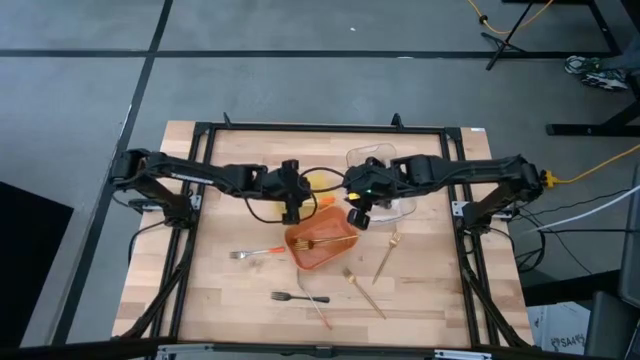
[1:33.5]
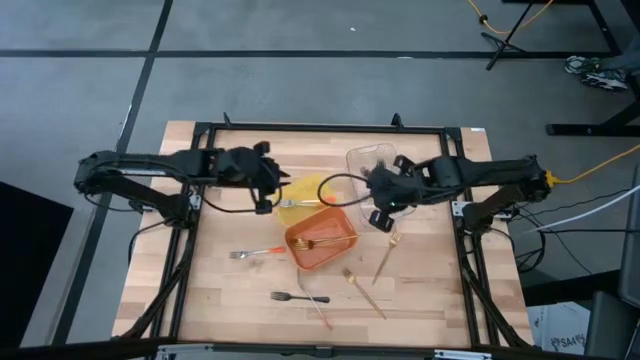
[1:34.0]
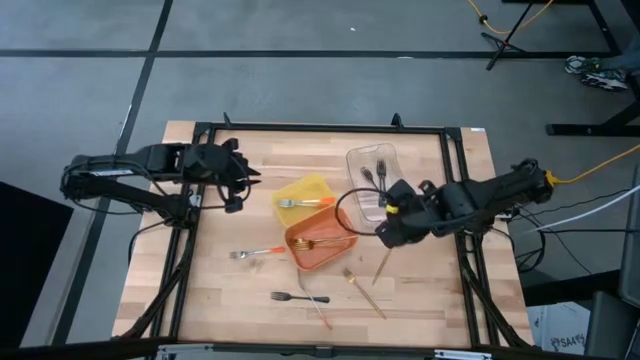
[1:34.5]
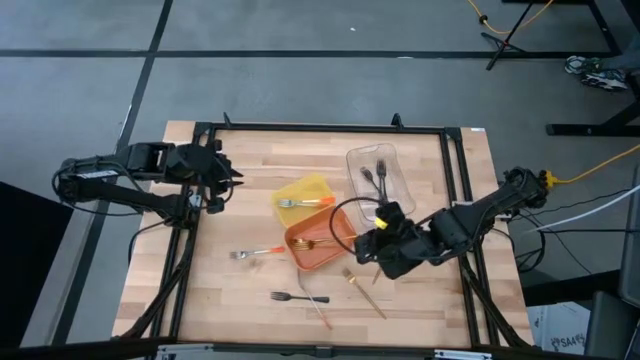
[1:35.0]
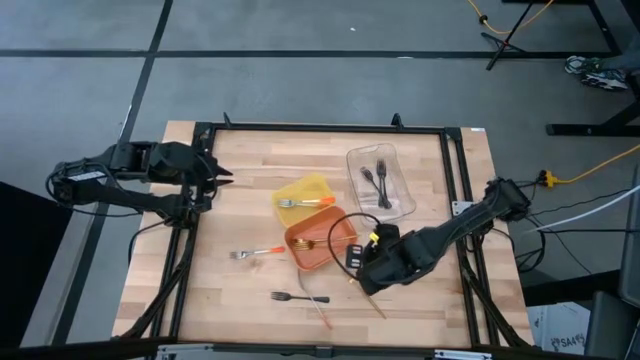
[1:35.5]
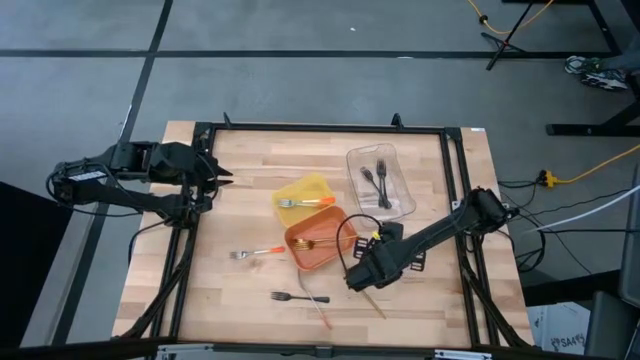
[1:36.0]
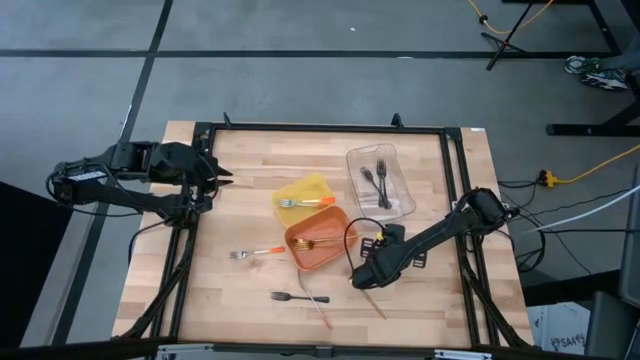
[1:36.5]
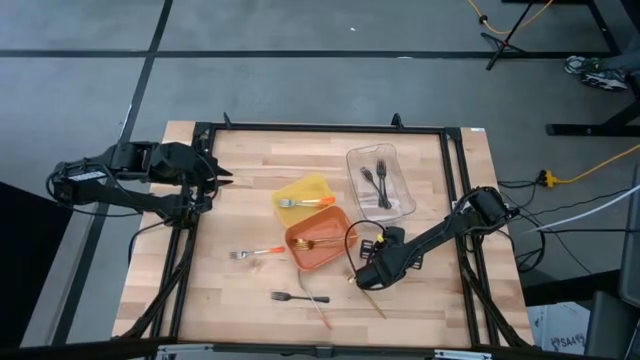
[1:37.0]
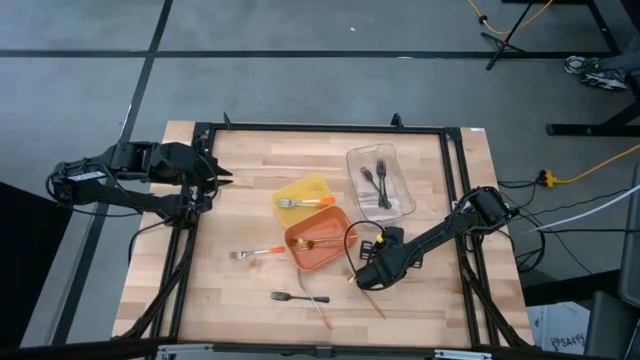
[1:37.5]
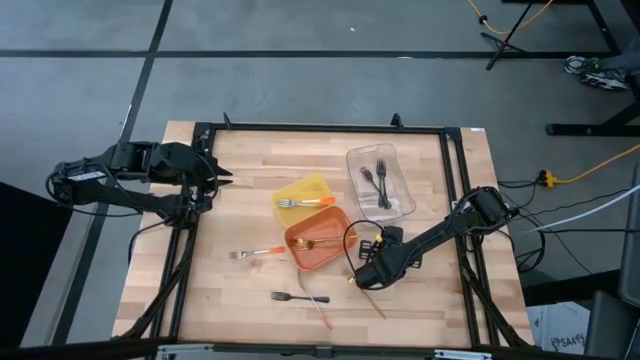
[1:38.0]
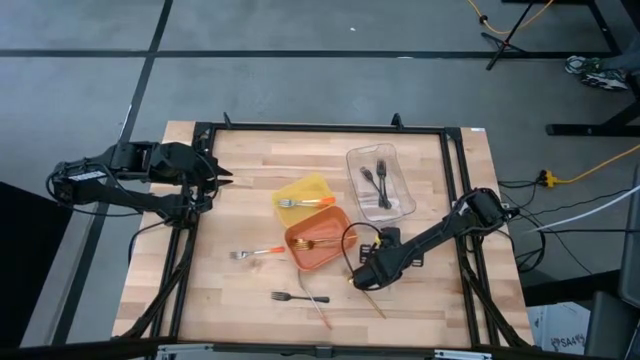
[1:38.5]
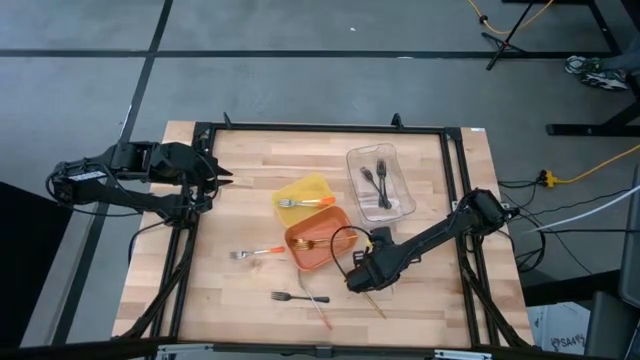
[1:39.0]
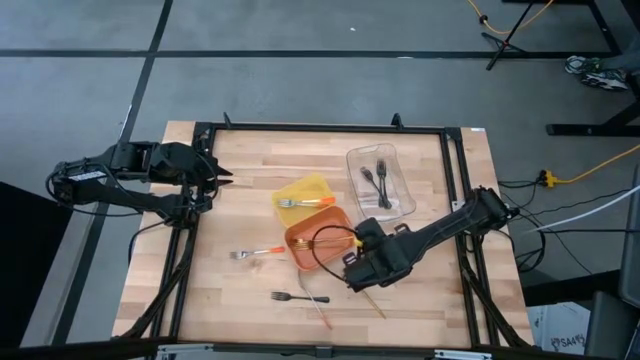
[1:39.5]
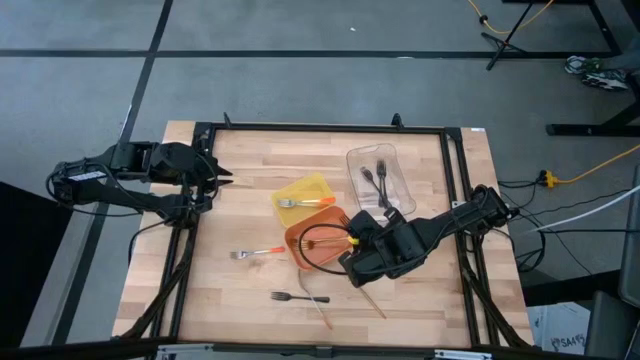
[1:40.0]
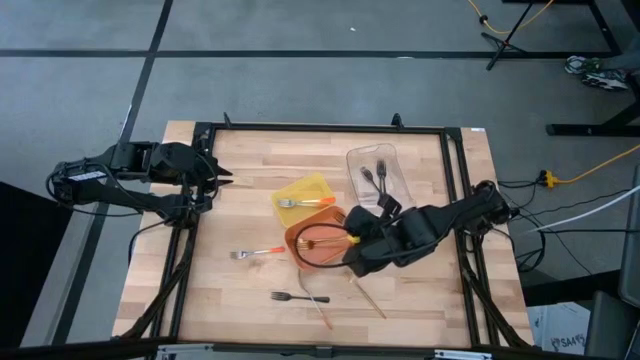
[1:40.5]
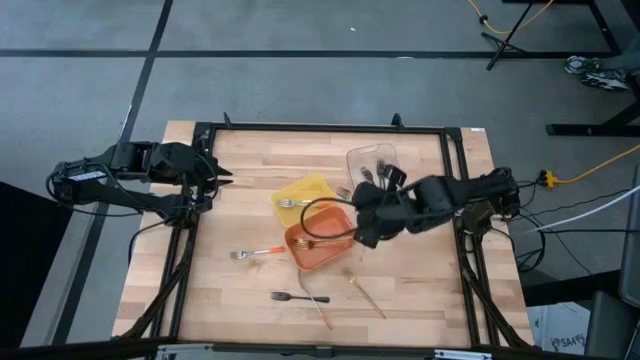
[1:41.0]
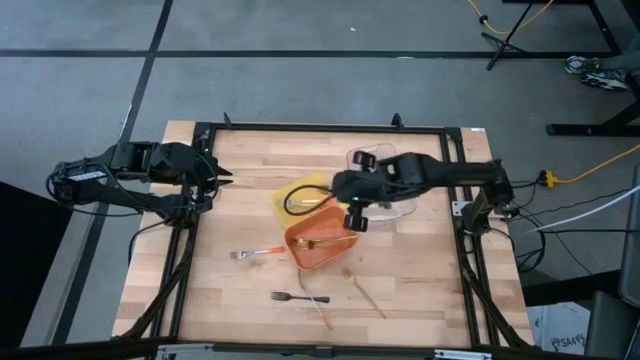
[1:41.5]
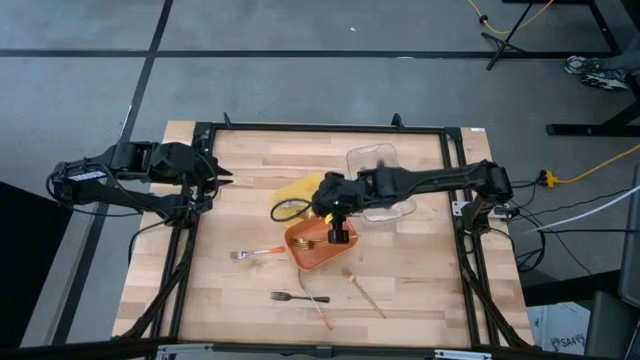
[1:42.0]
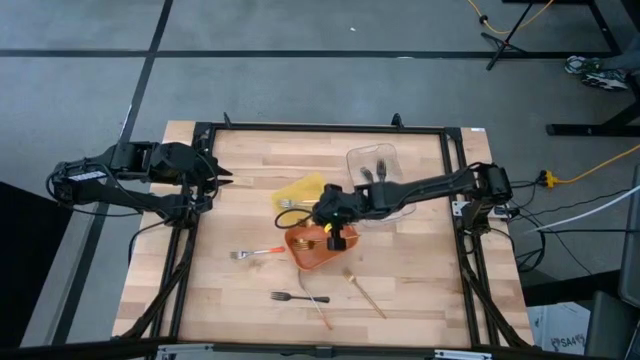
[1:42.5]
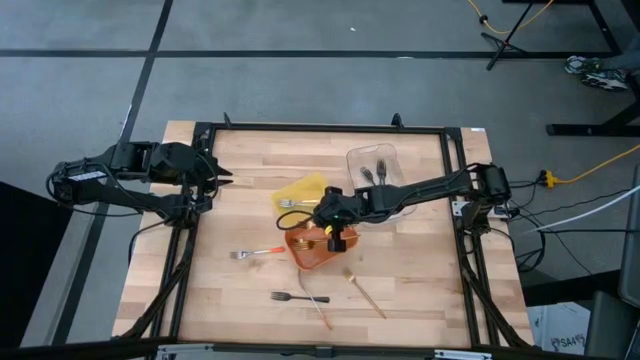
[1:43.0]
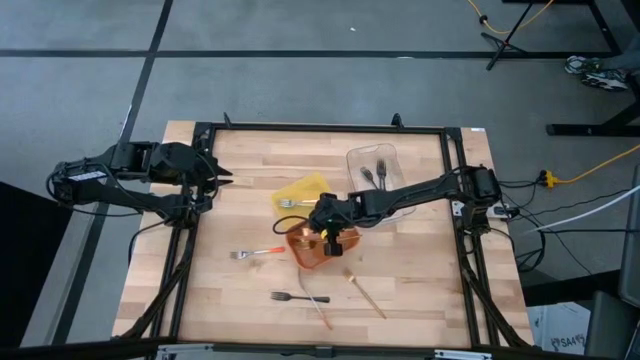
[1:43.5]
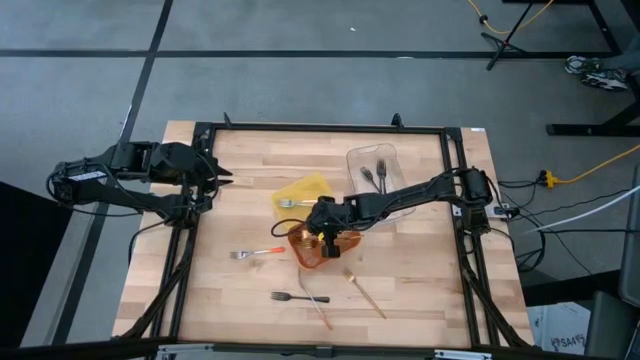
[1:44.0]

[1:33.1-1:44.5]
Task: Sort silverware by color (type)
Put the gold fork into the orange bin

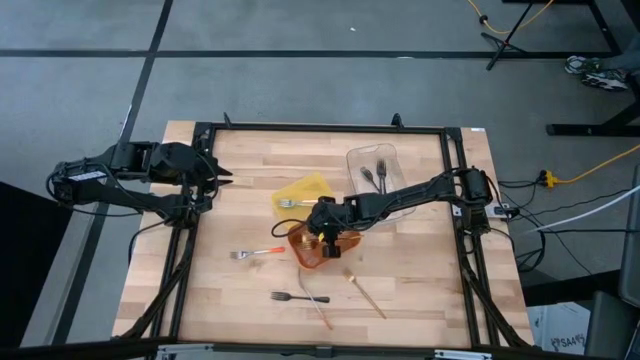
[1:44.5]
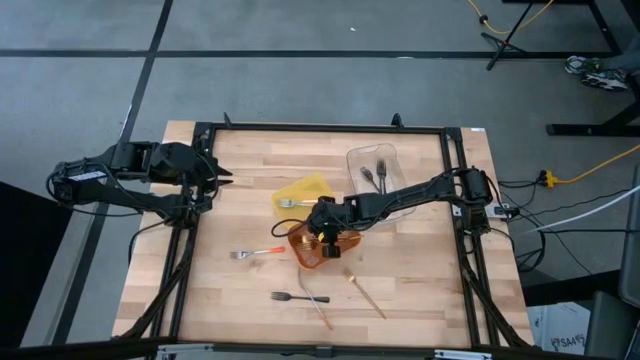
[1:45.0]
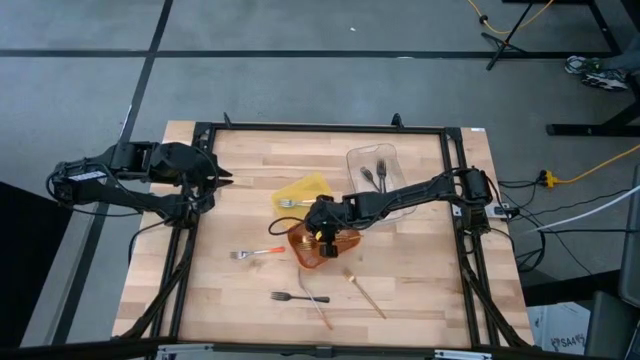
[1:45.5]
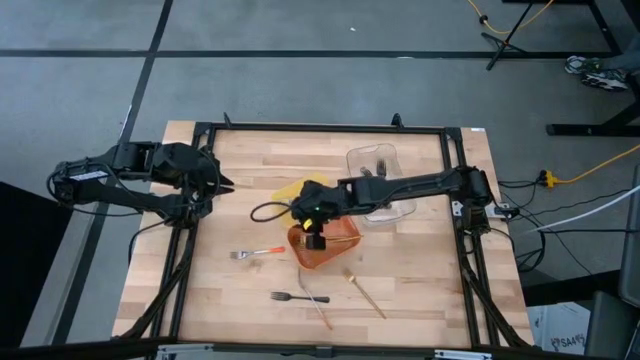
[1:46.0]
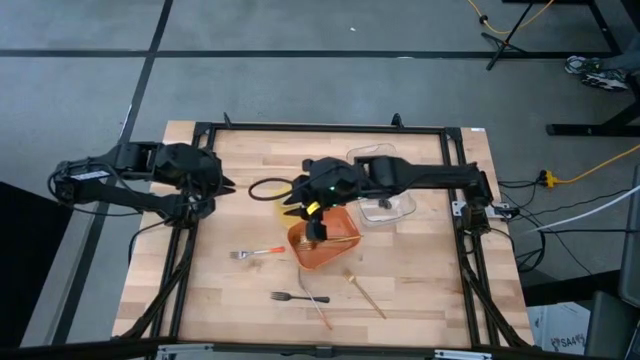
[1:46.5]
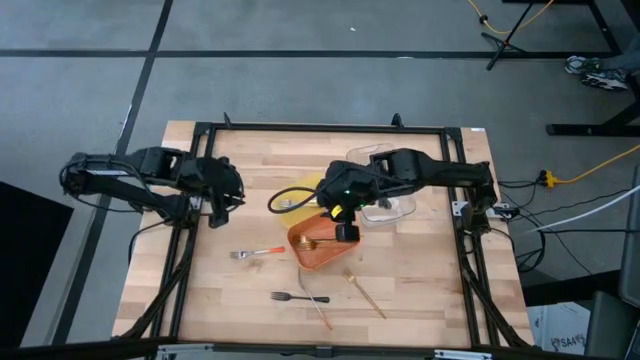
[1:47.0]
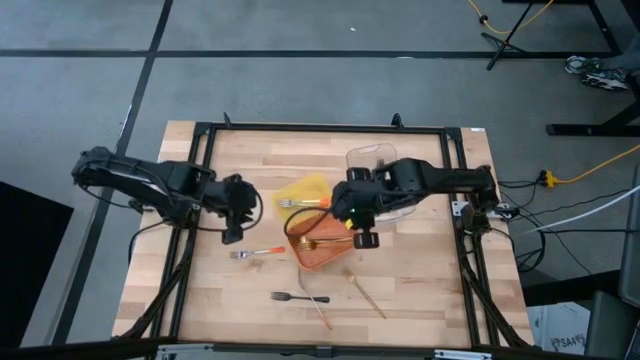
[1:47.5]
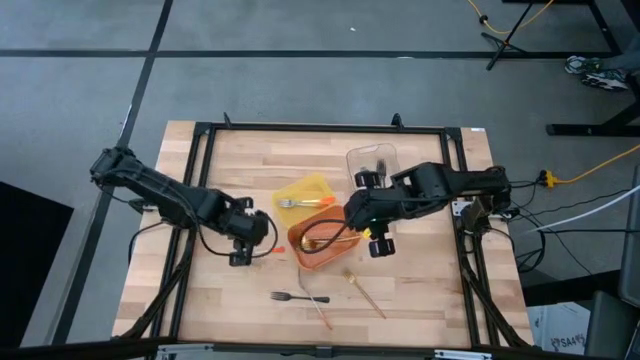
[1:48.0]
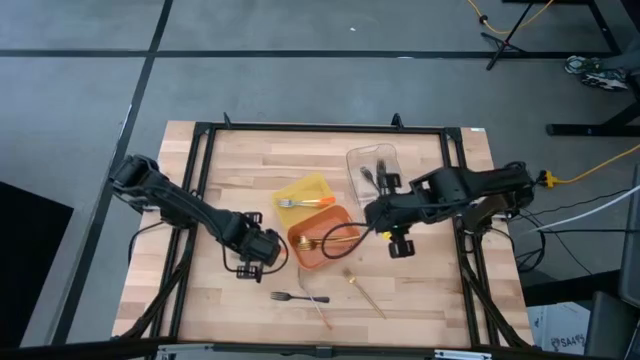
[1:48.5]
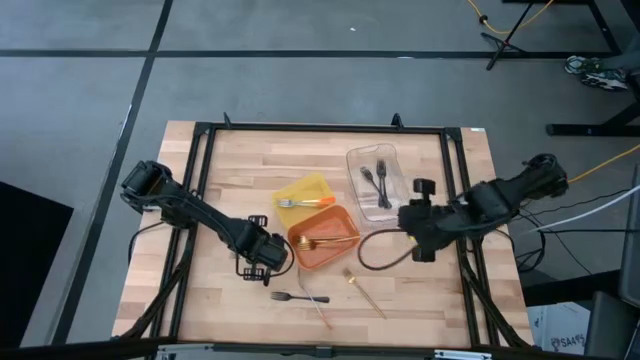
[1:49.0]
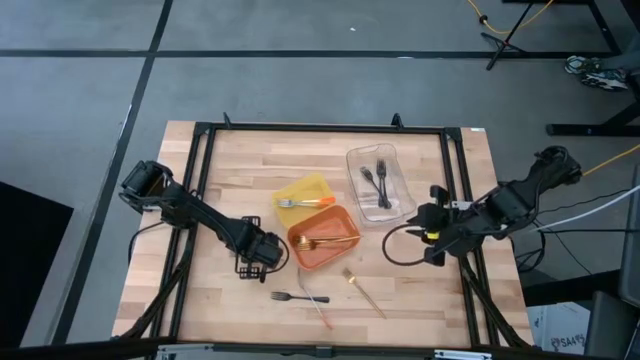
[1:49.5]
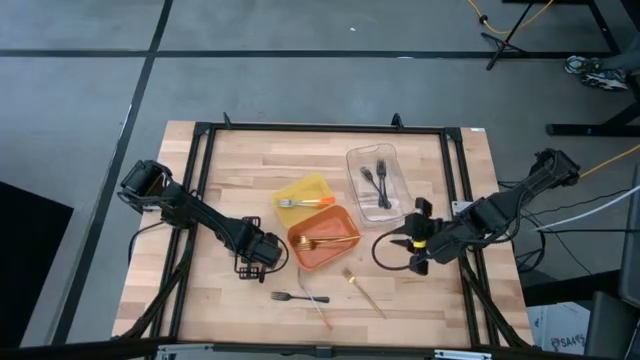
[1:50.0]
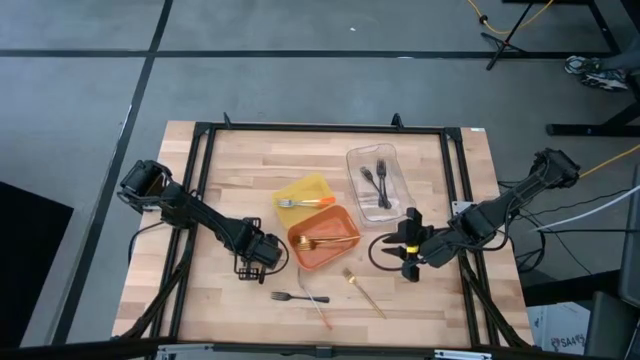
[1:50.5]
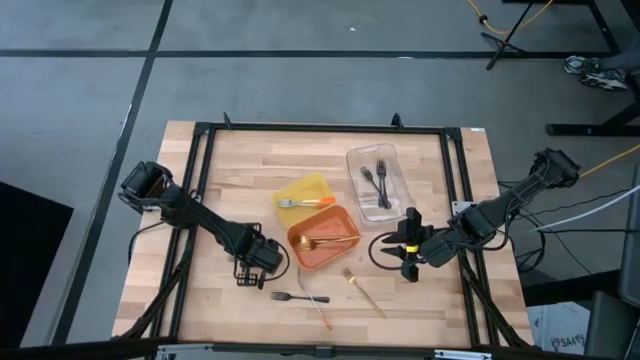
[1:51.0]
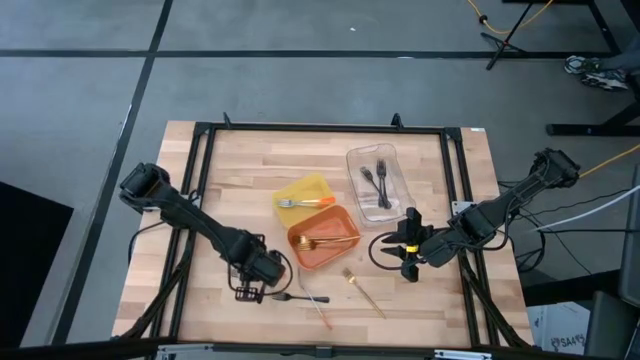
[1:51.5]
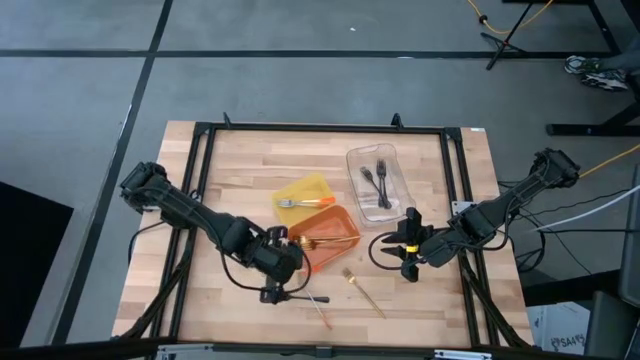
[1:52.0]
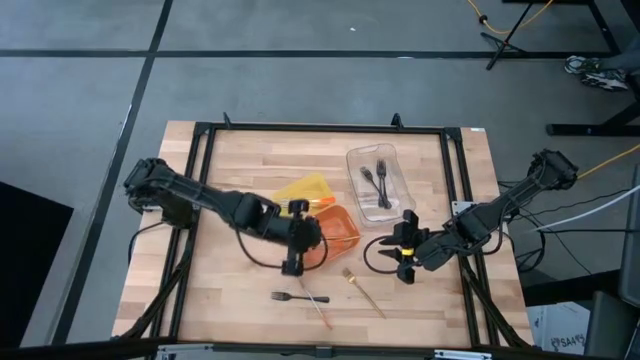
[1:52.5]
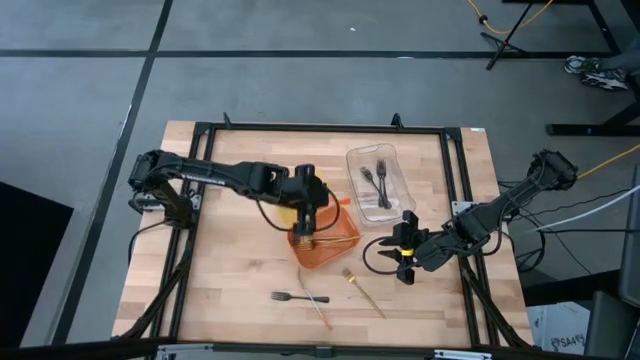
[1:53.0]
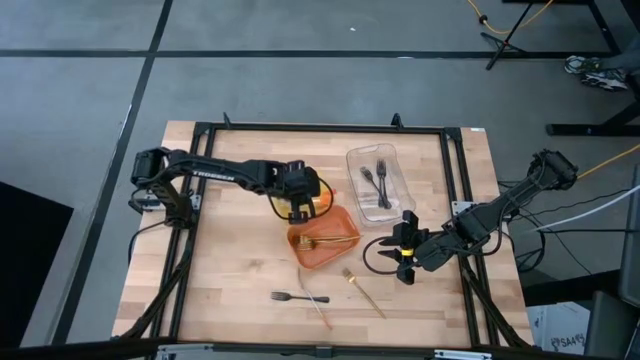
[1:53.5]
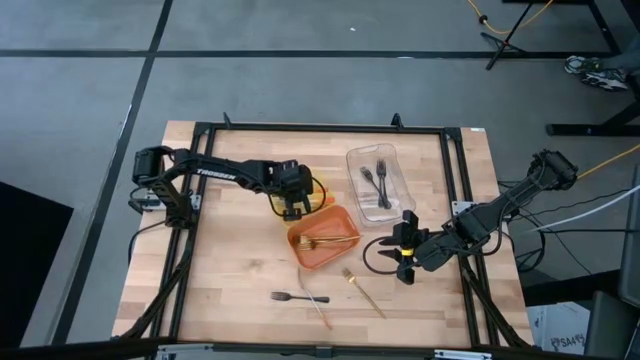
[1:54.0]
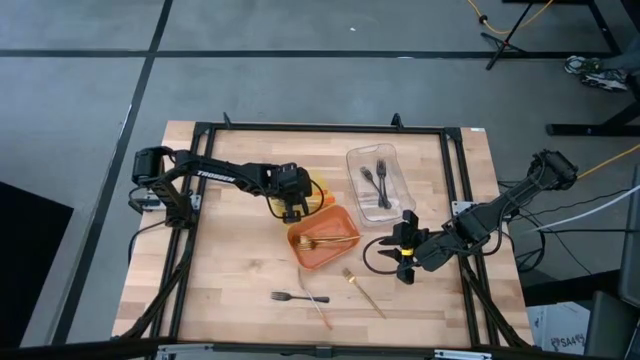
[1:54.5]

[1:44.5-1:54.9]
Put the orange fork into the yellow bin
